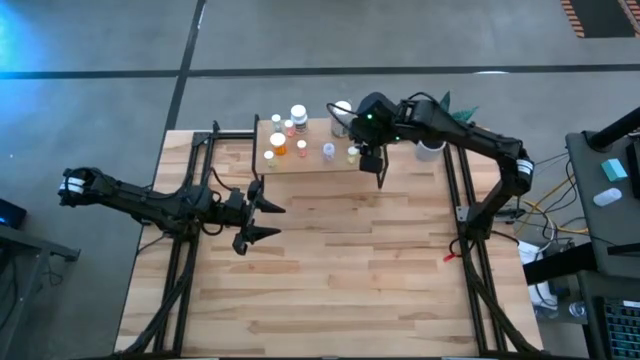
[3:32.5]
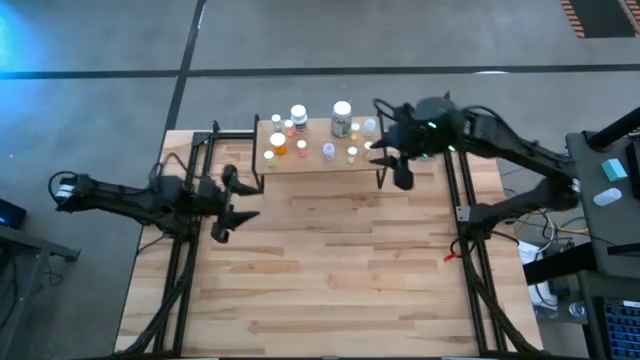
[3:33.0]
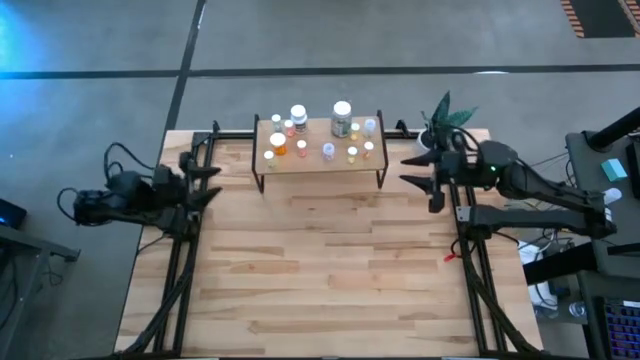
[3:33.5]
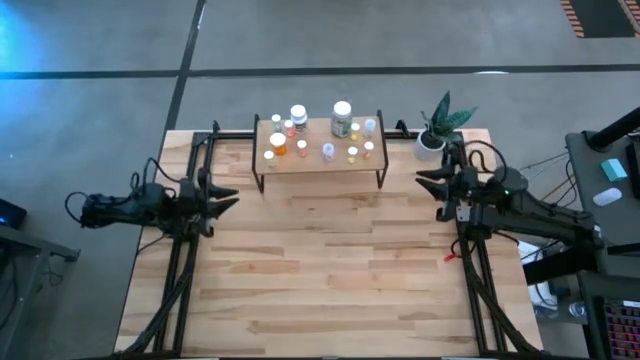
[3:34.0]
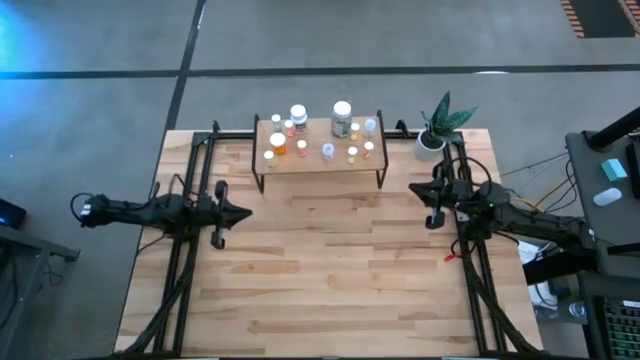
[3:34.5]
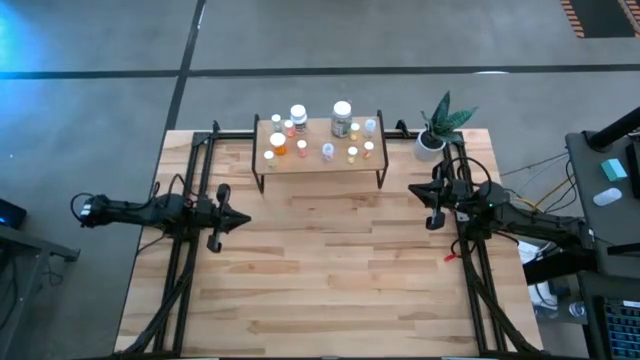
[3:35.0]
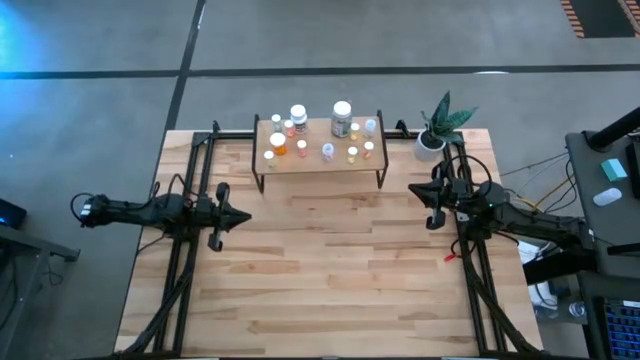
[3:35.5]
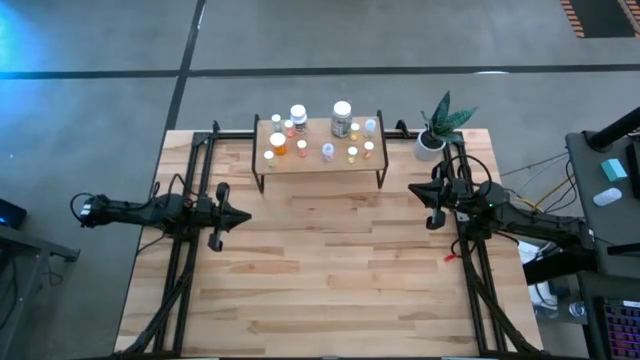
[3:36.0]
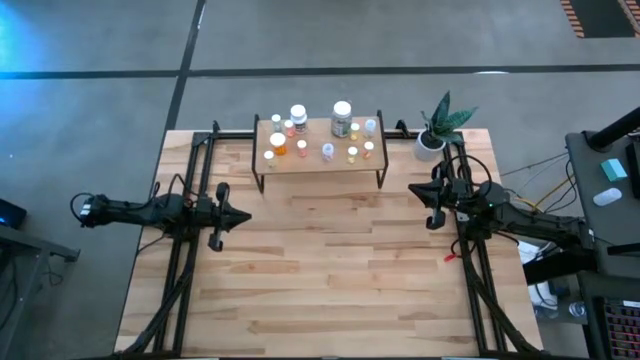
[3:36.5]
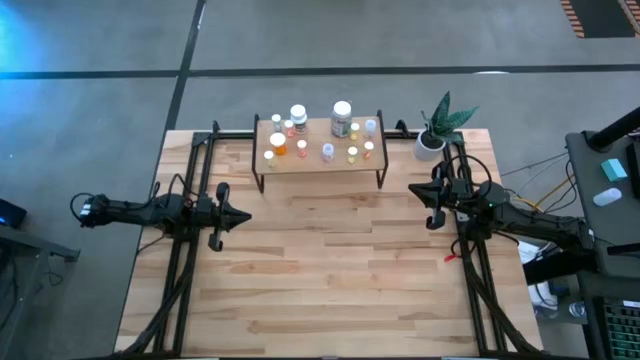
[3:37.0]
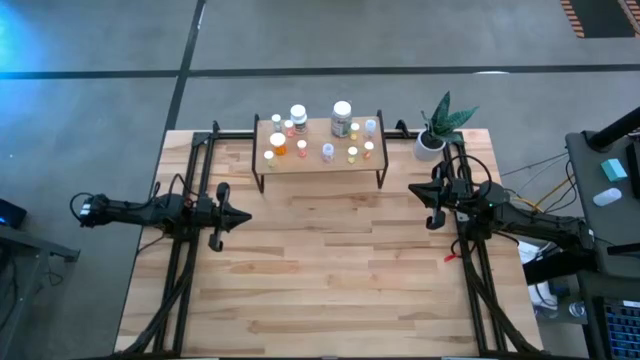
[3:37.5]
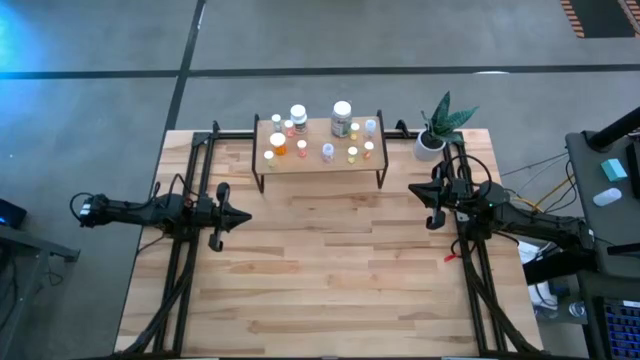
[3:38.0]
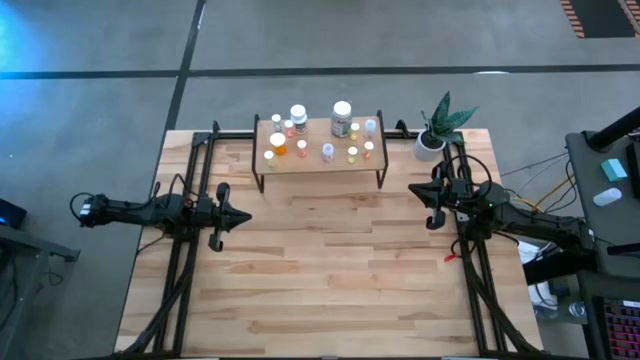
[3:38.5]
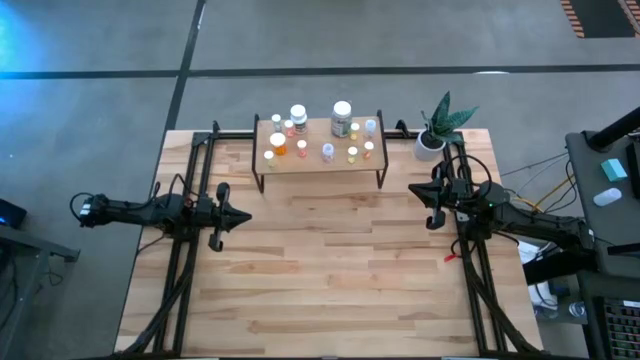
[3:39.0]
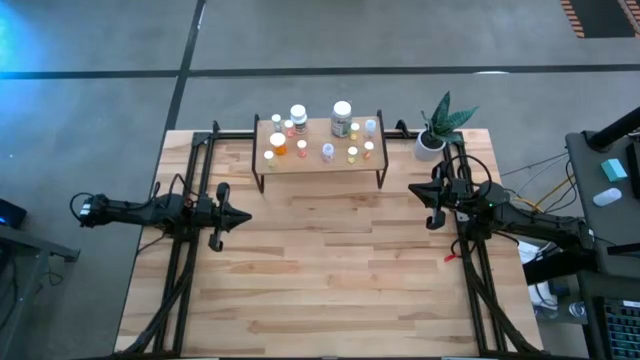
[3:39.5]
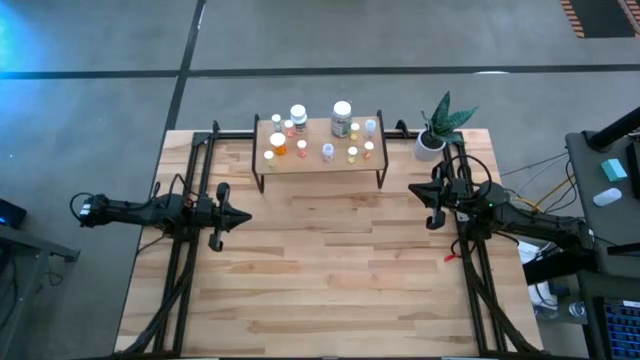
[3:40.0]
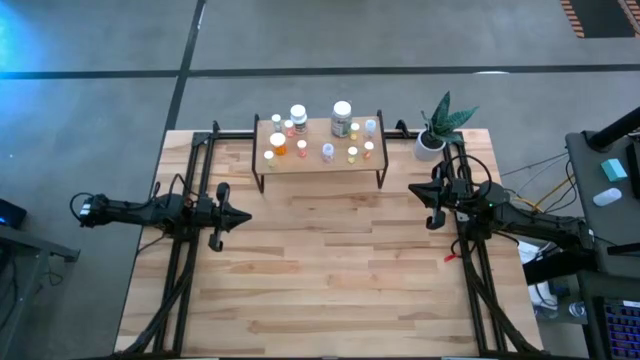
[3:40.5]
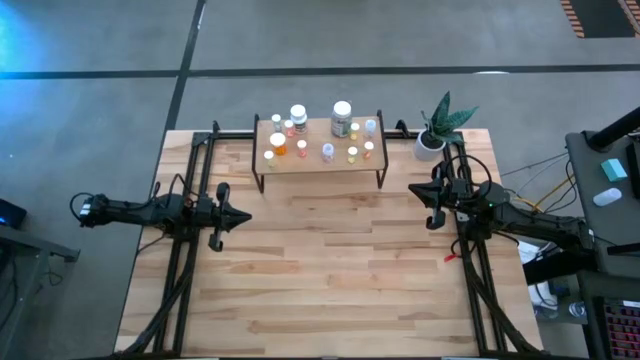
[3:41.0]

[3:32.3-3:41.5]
Task: Pick and place medicine bottles onto shelf by color
Return to Home Position

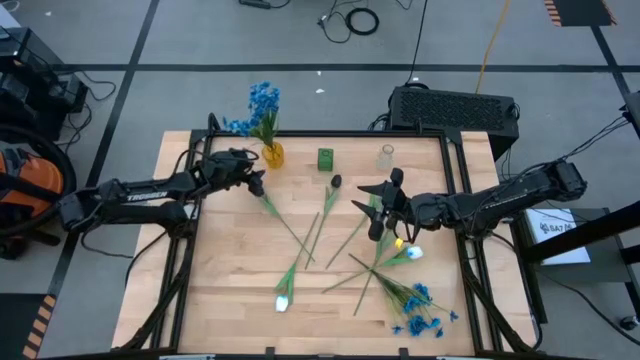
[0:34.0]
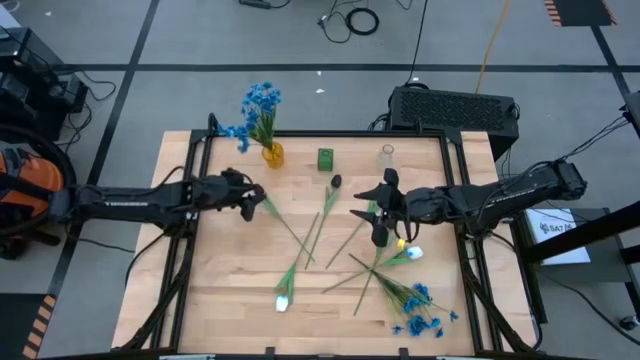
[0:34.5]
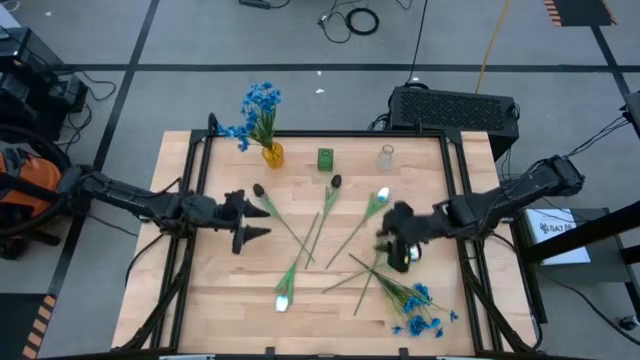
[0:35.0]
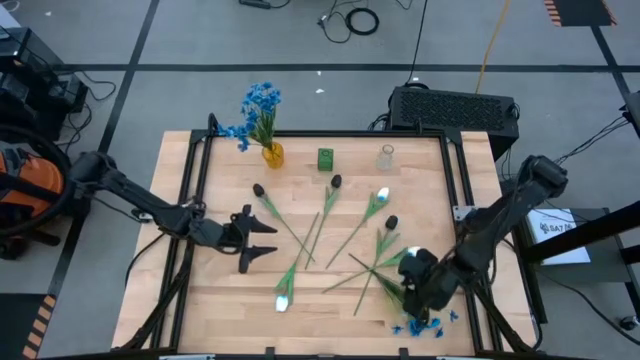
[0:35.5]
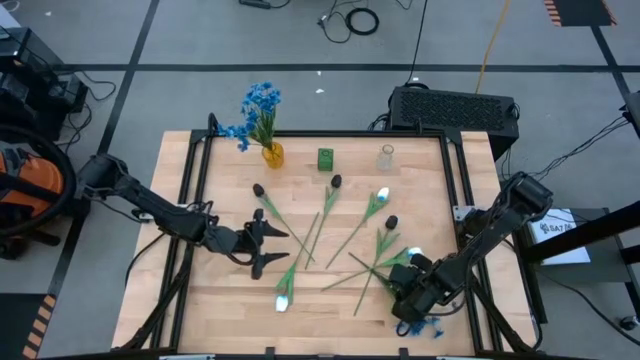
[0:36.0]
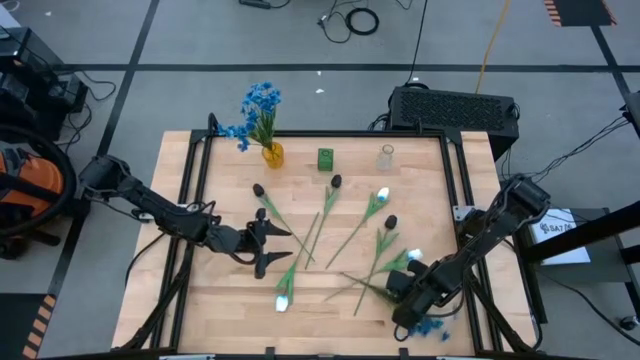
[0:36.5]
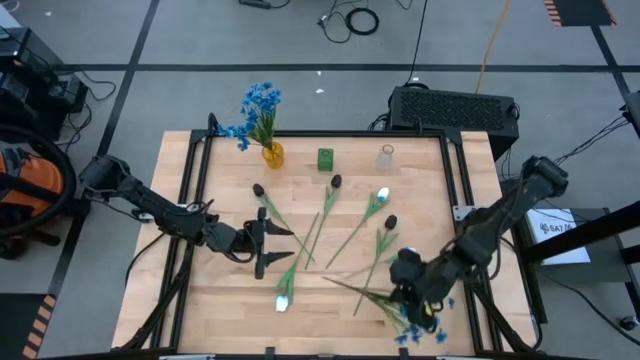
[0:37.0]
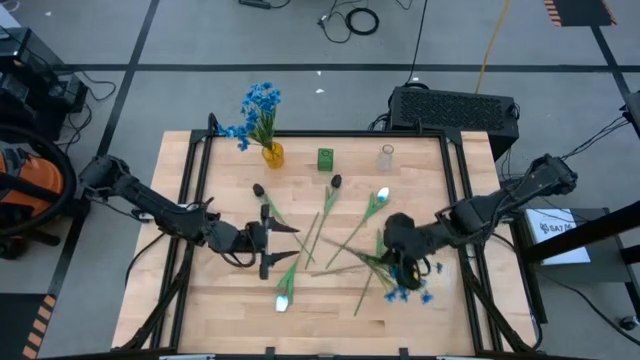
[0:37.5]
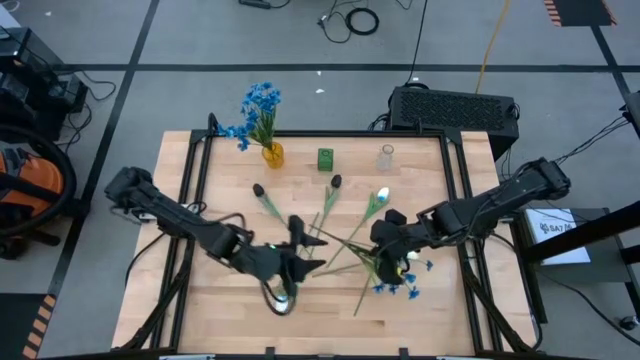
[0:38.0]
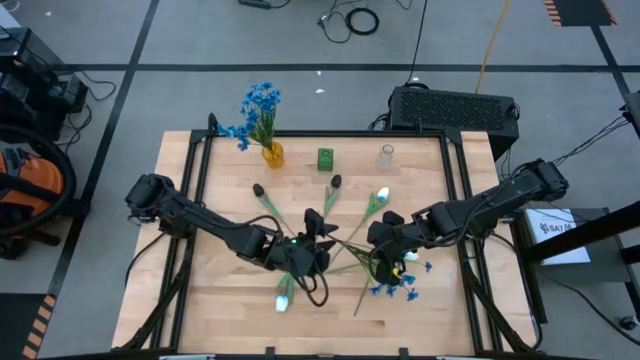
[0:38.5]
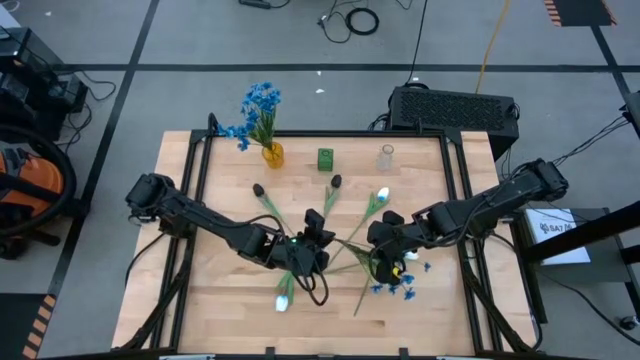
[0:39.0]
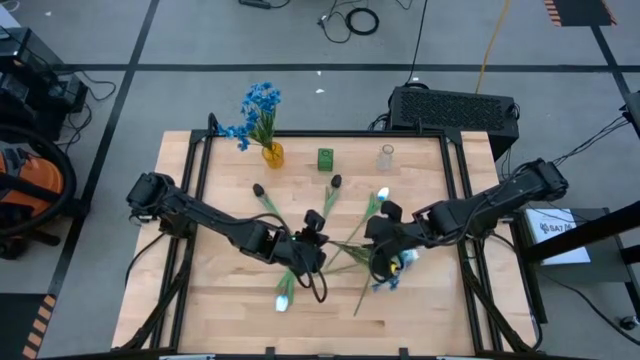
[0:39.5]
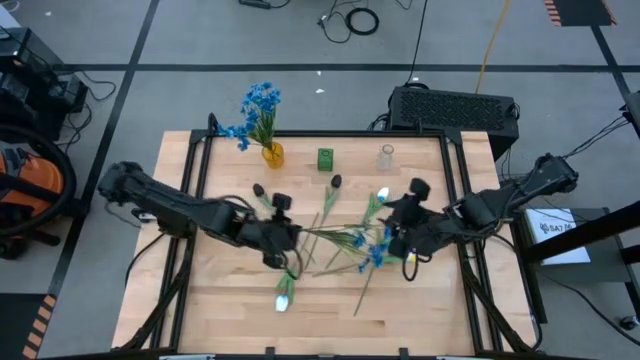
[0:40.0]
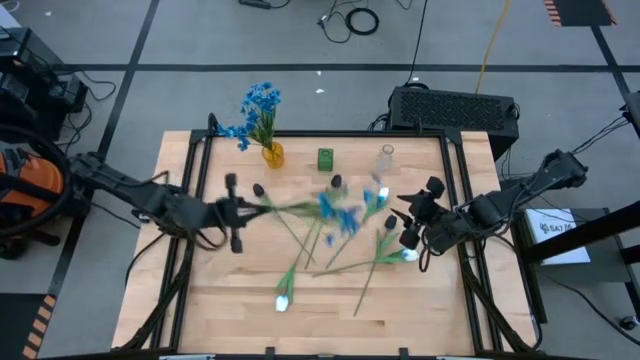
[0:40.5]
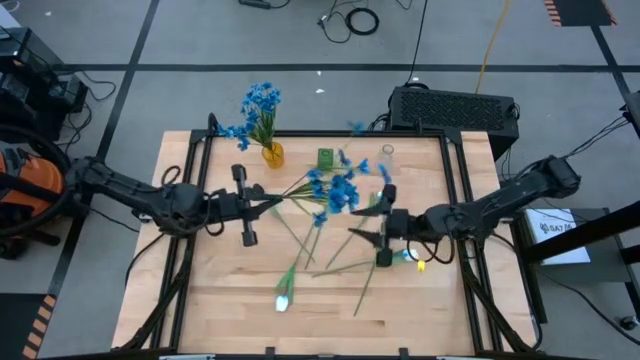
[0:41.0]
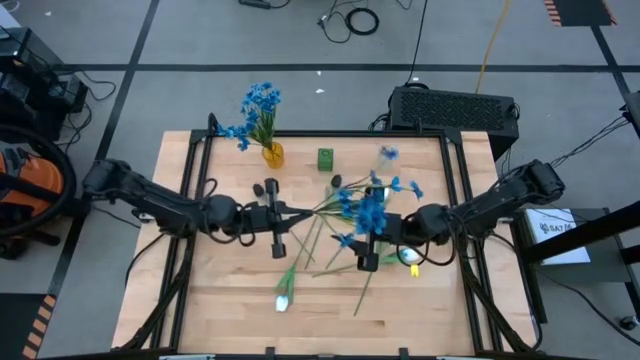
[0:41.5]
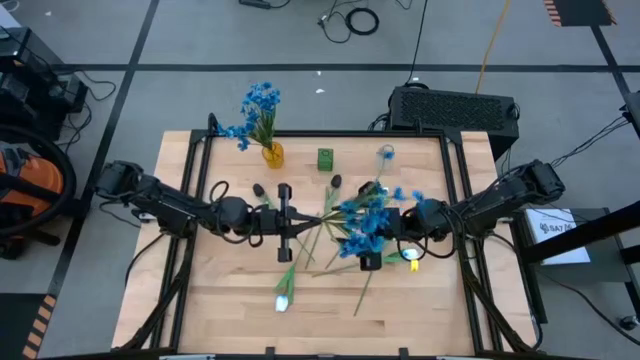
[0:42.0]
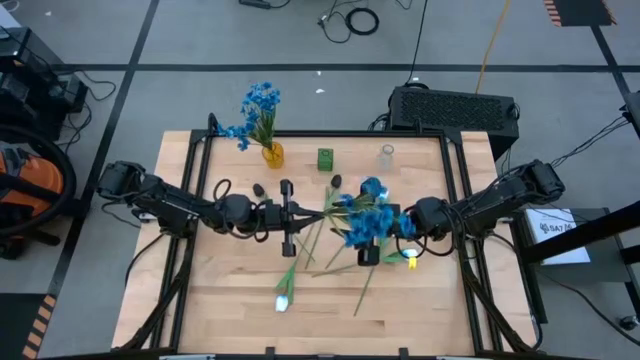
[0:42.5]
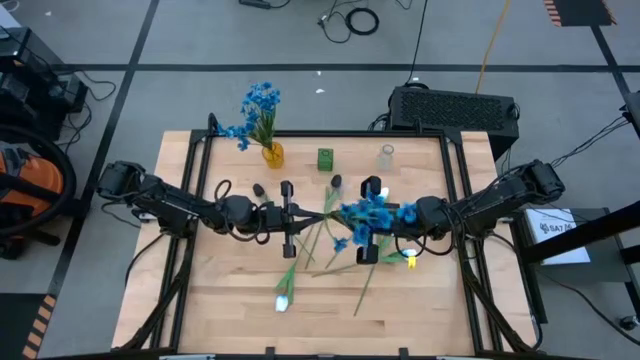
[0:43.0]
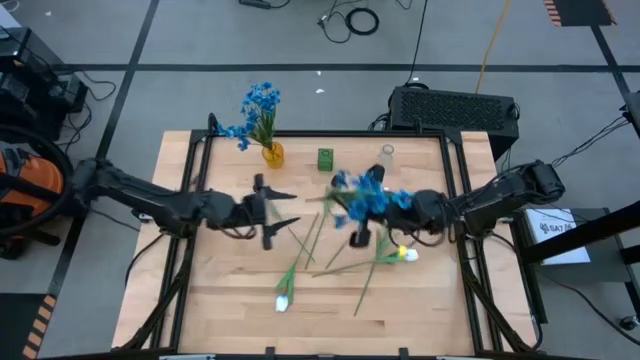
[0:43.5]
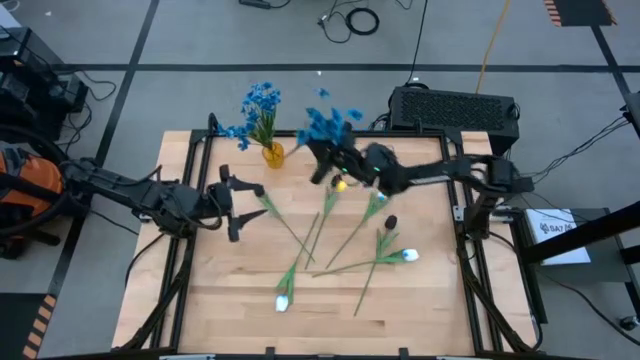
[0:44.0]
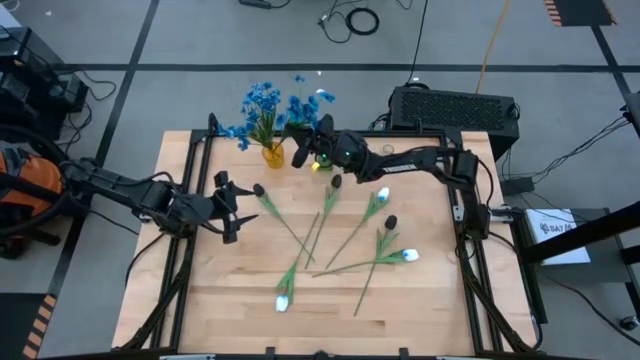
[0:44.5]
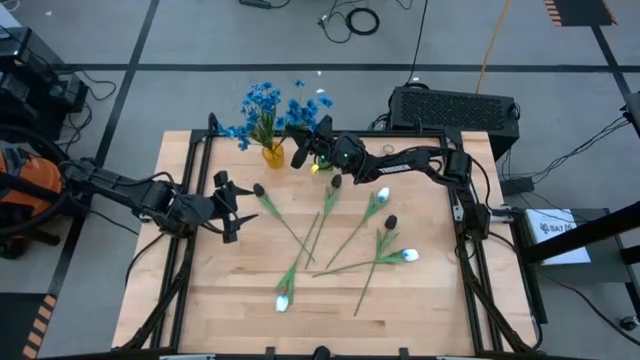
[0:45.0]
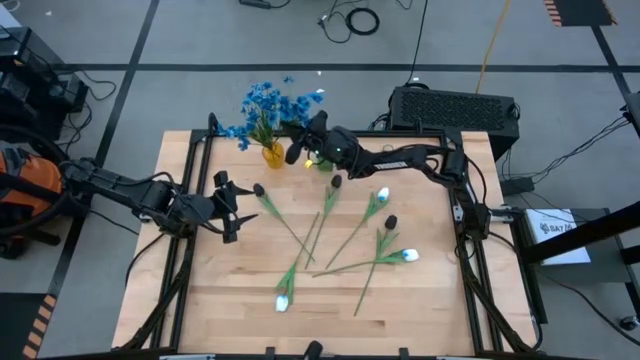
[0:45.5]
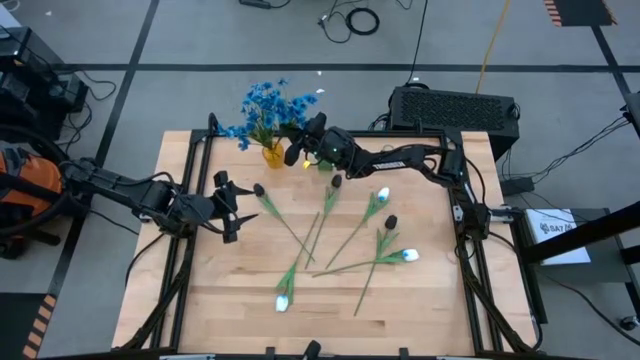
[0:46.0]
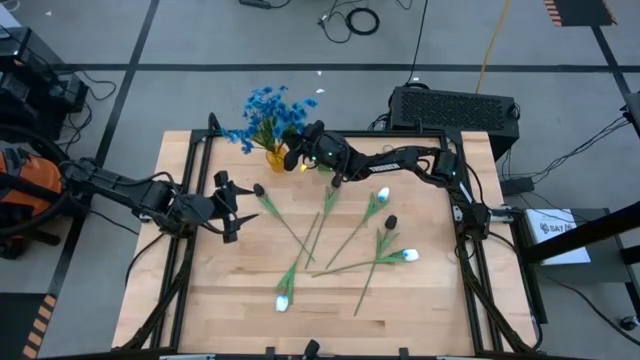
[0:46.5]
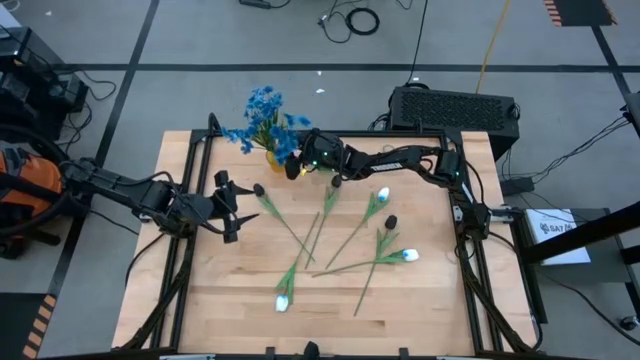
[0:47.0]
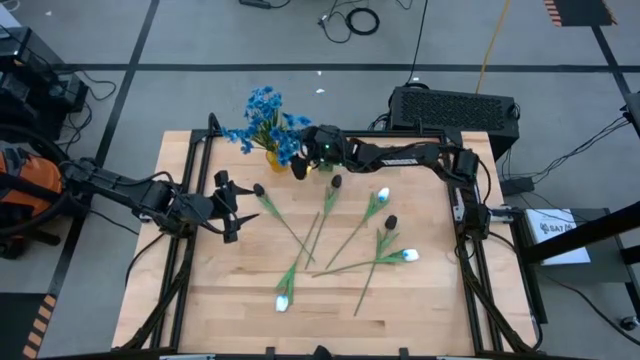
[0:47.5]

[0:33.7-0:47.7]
Task: Sort flowers into vase by color
Put the blue flowers into the yellow vase
